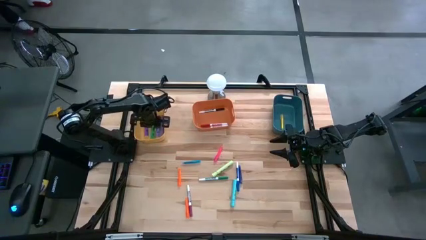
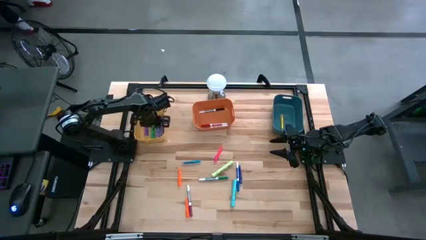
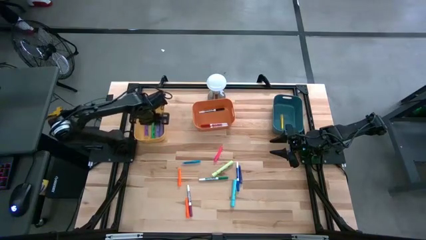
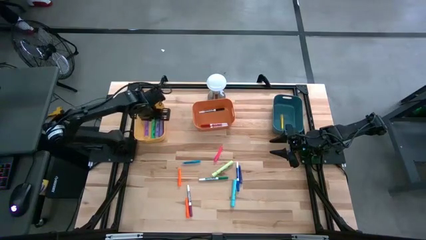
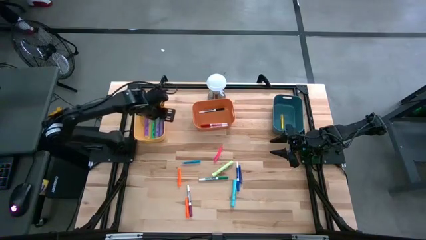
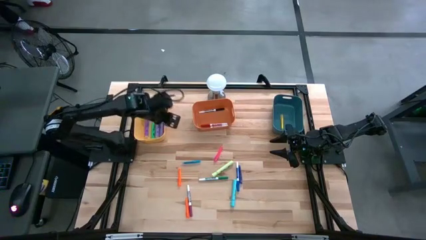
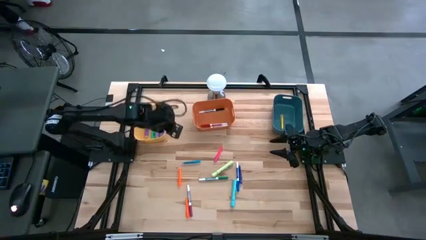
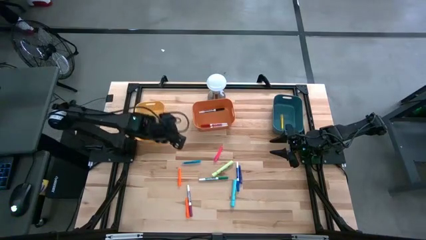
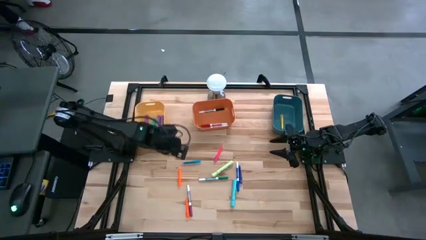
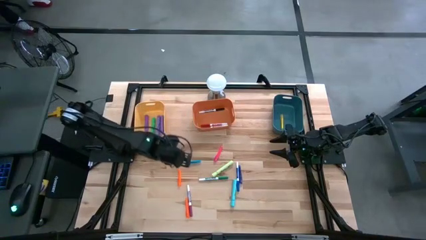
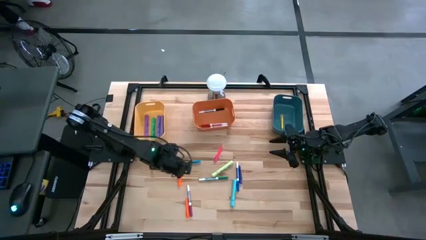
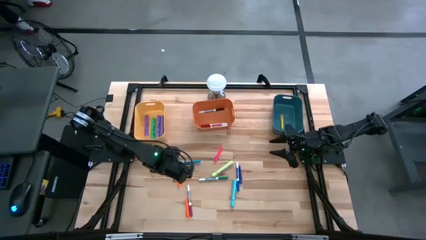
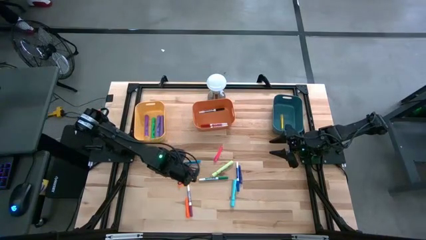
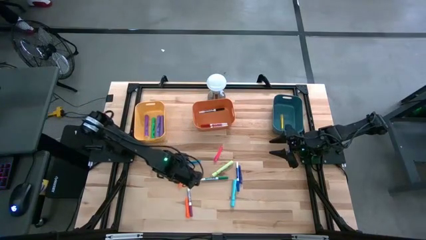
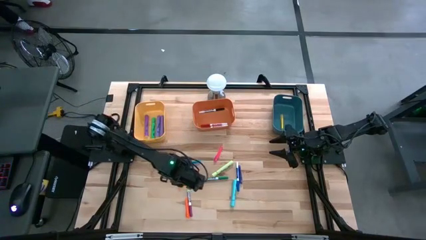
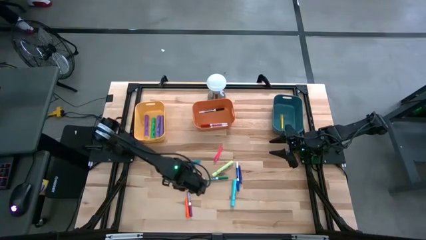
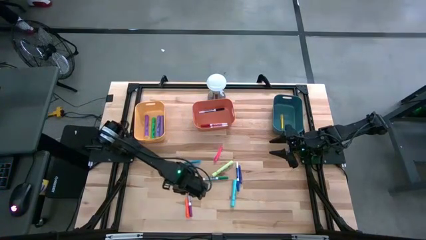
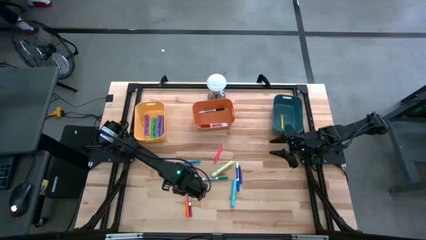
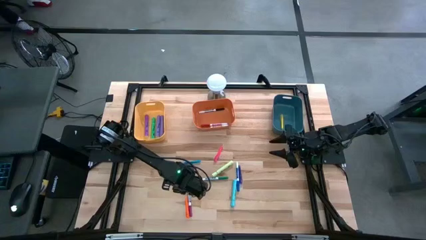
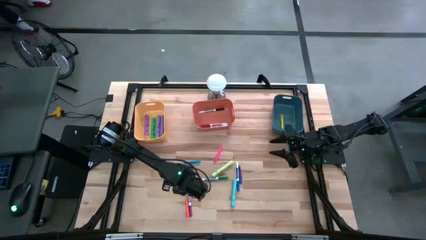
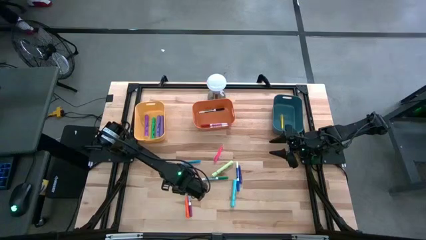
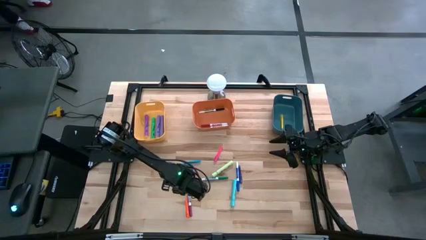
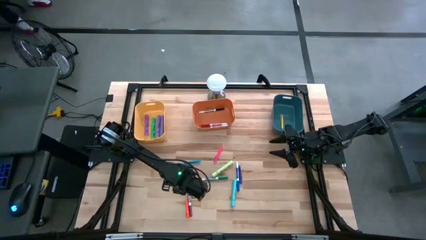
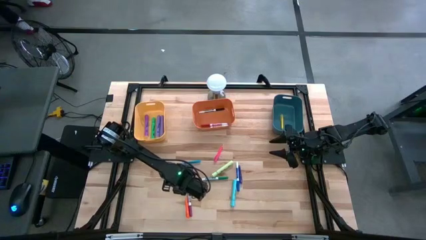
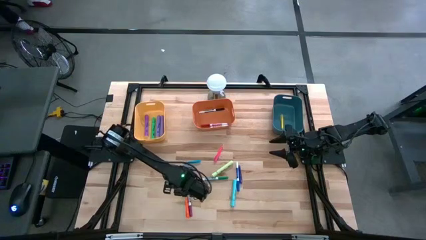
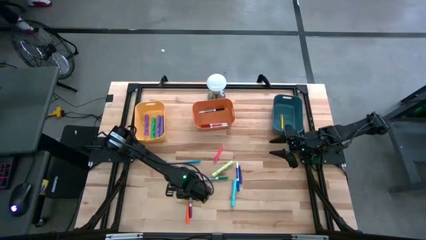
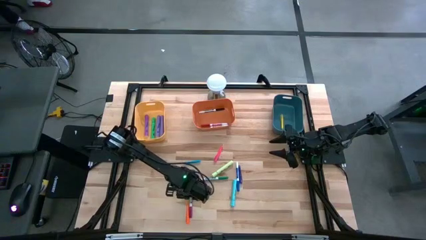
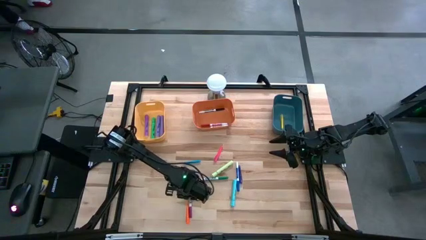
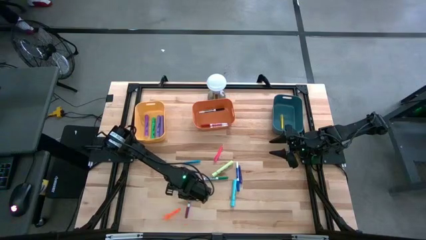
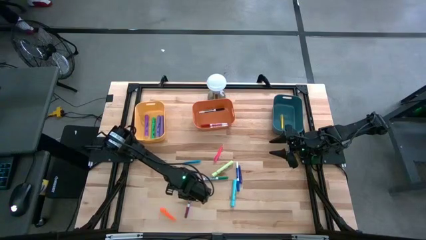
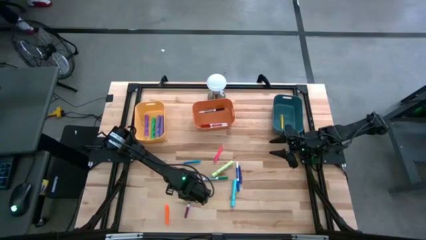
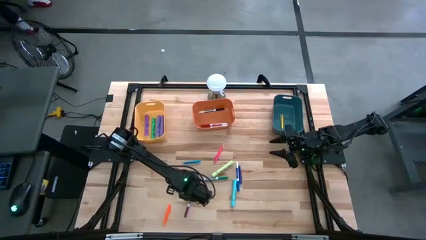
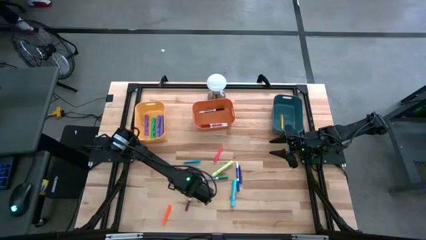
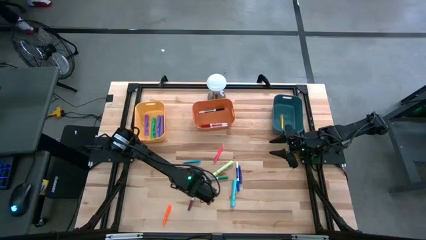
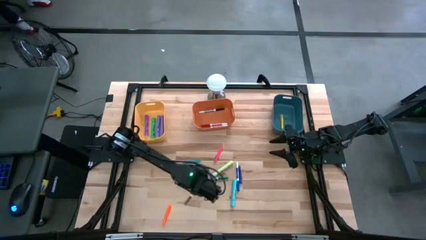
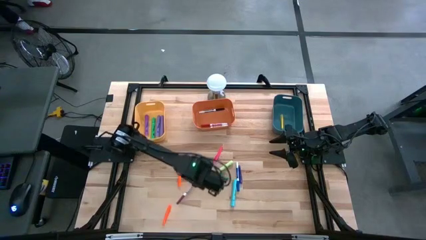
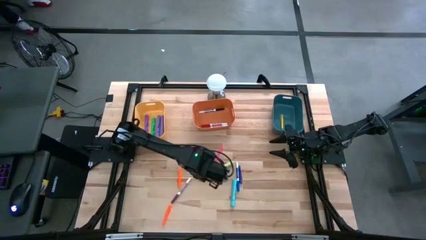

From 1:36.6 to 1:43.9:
Task: Pick & Place Markers
Put the pink marker pen into the orange bin

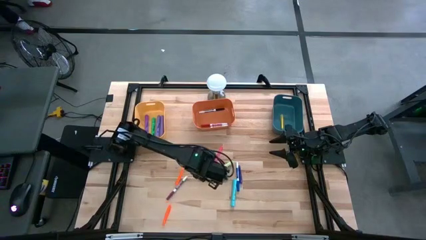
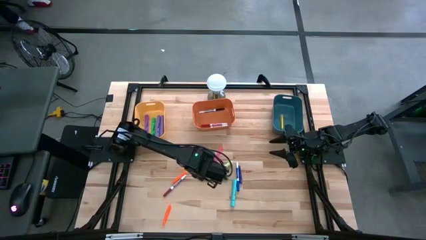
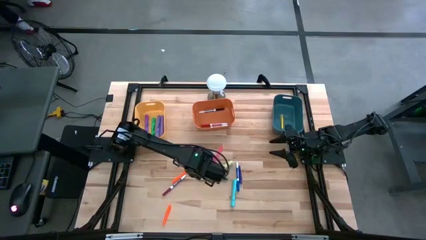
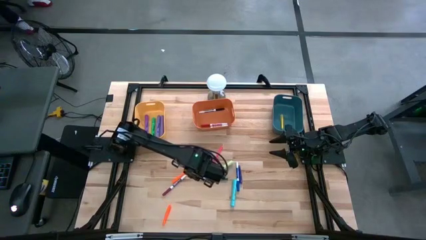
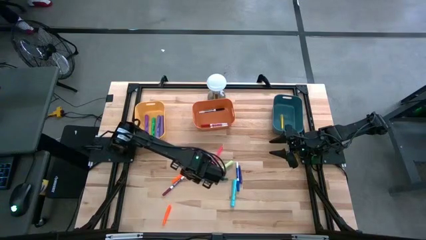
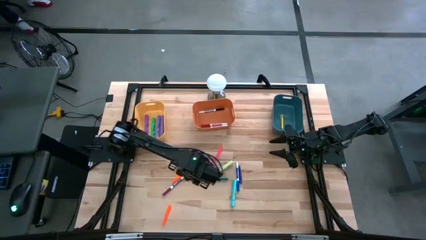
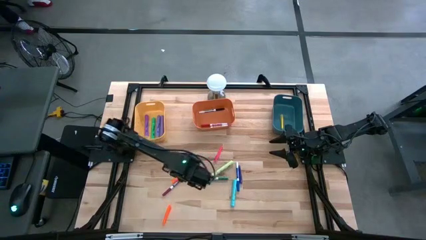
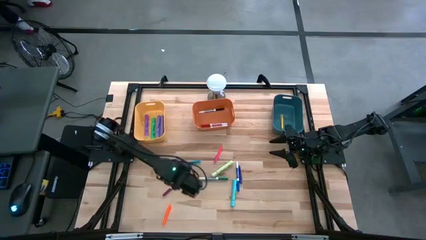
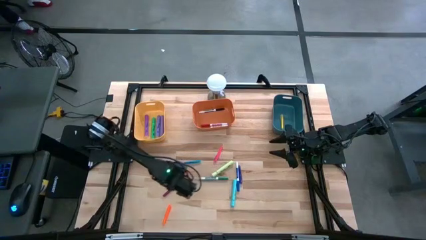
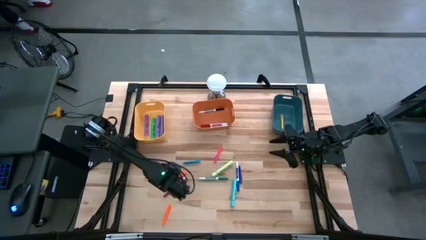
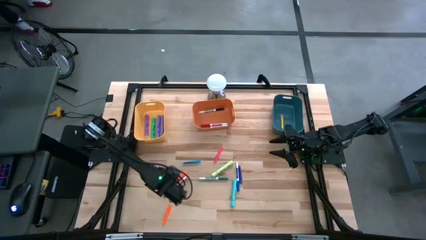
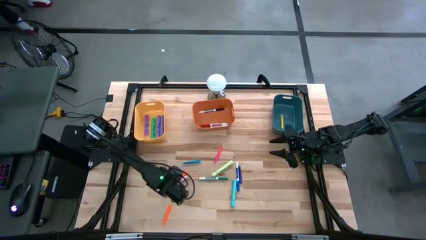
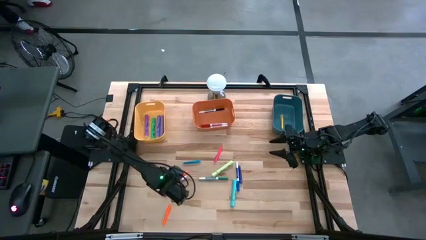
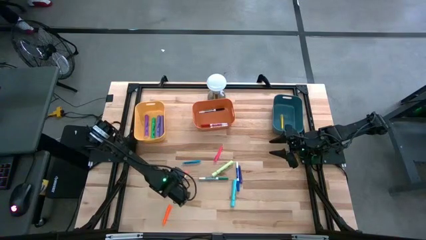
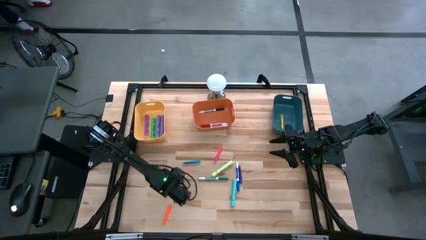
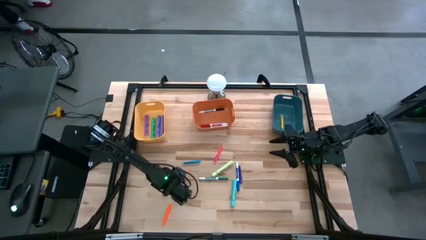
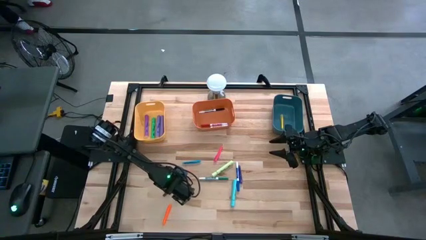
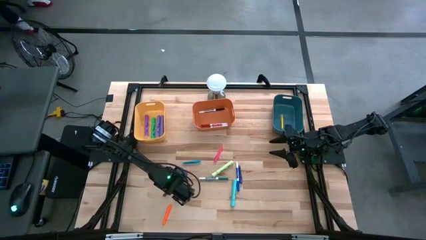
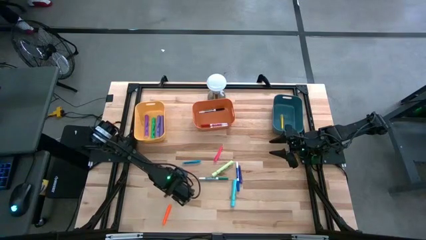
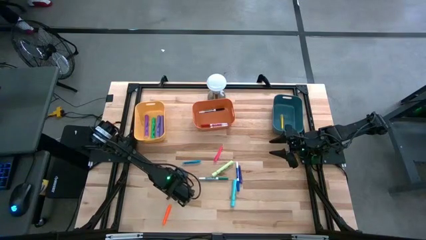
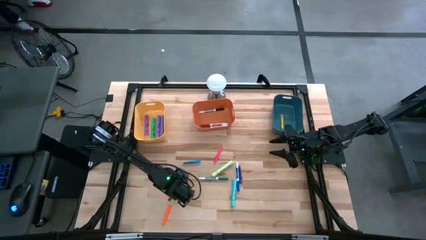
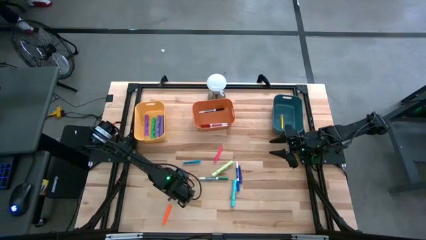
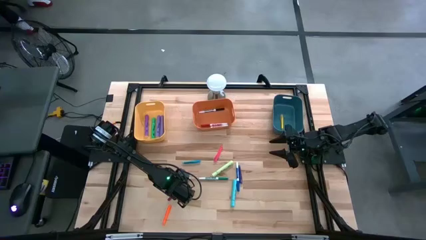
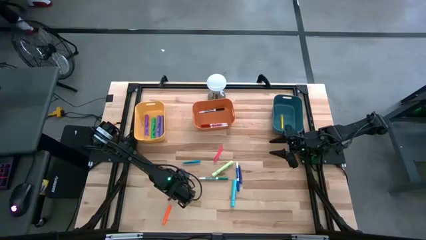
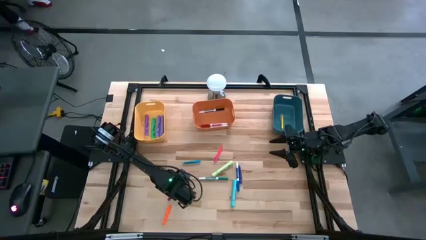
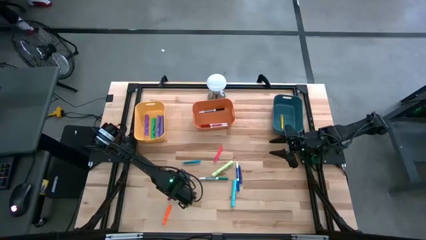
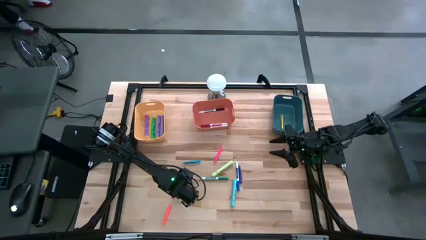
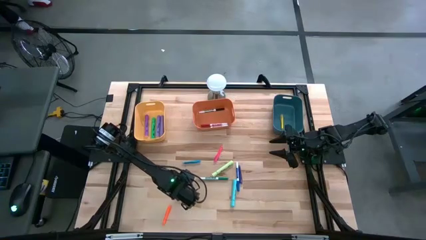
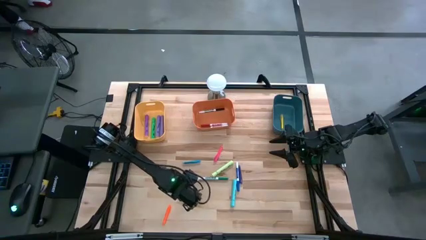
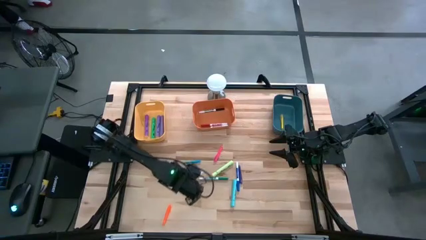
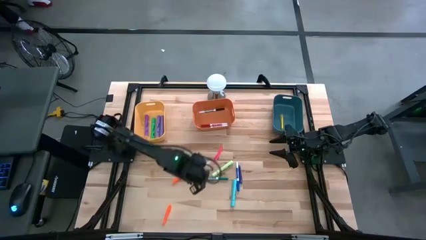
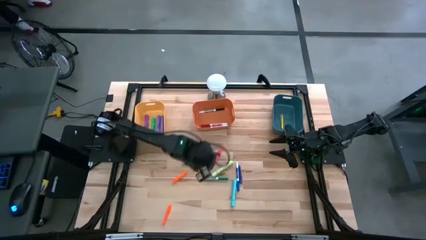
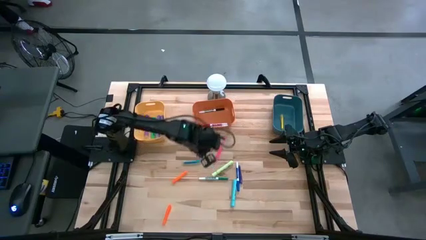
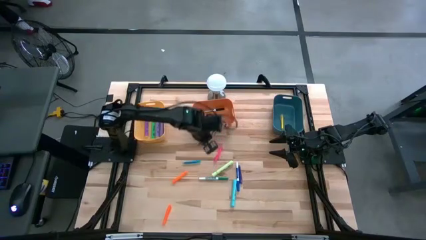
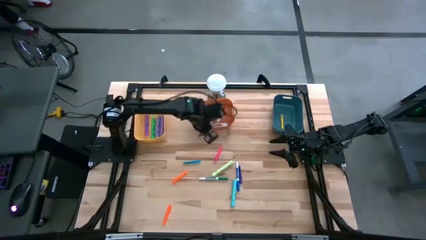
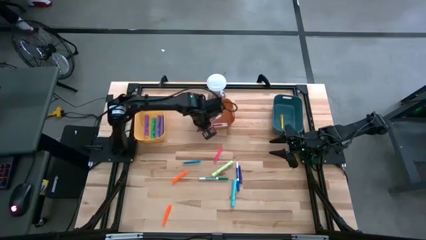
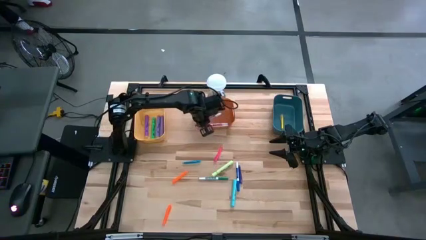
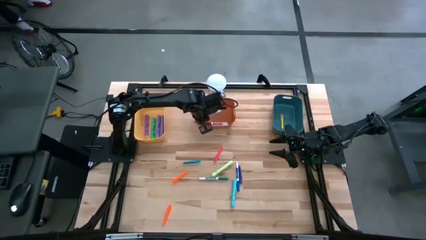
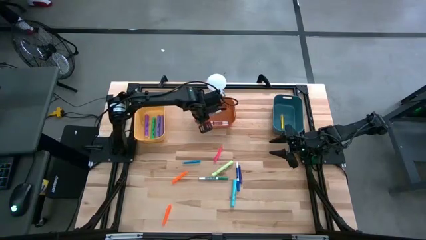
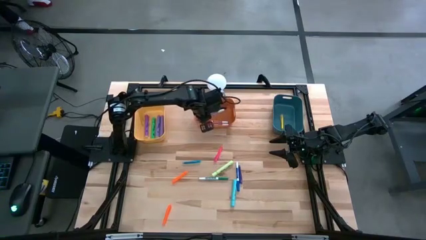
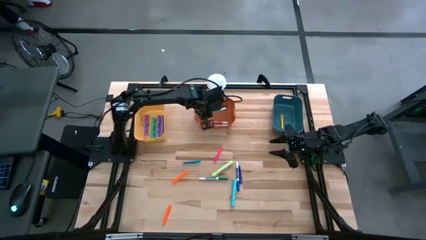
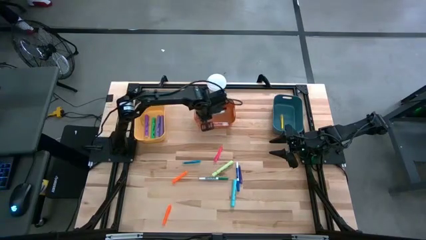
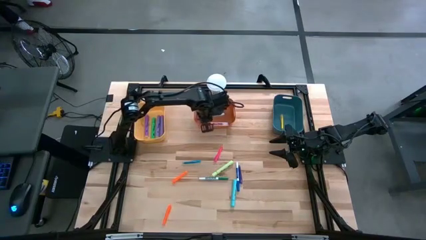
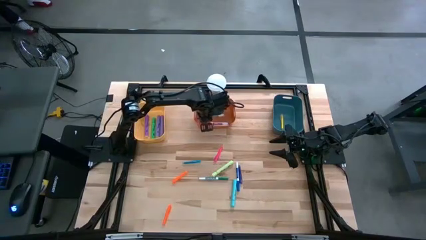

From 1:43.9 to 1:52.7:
Put the pink marker pen into the orange bin
